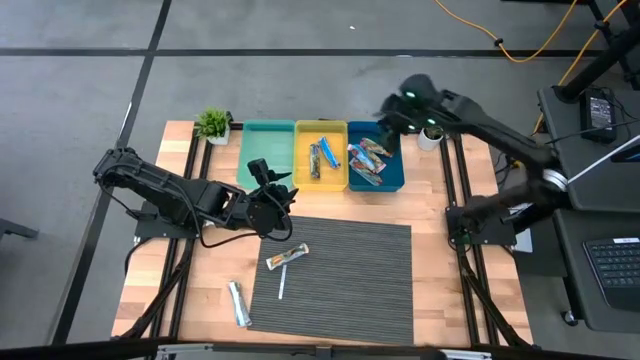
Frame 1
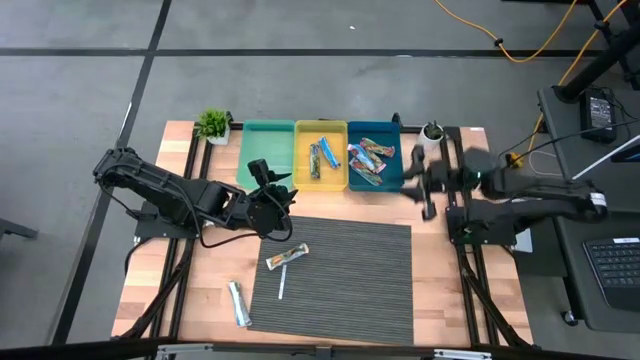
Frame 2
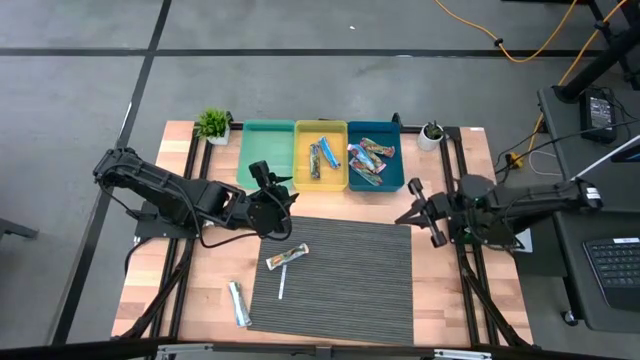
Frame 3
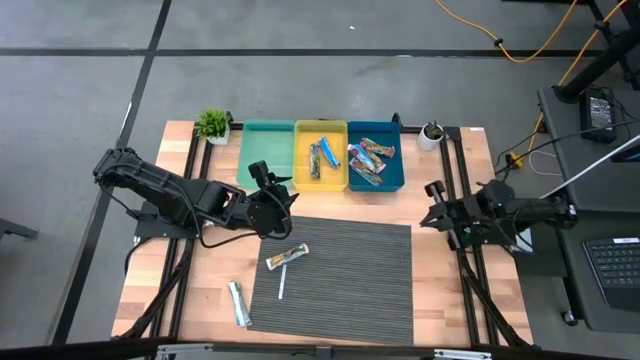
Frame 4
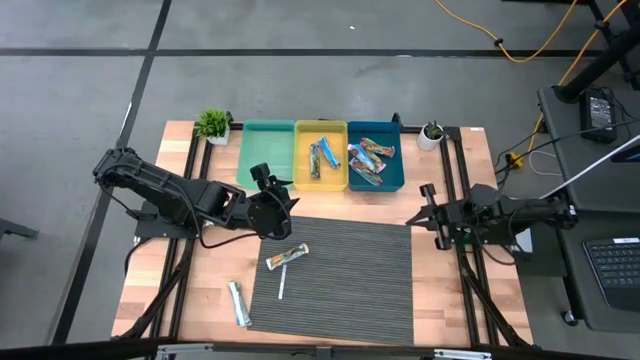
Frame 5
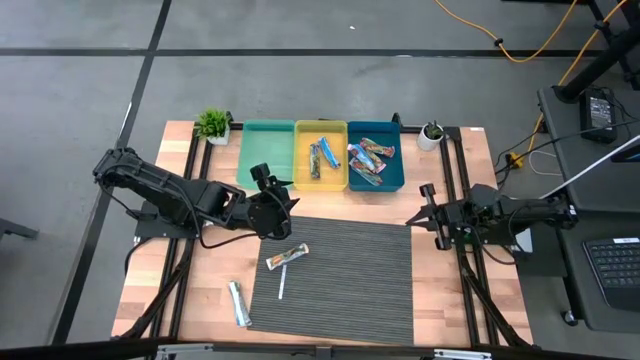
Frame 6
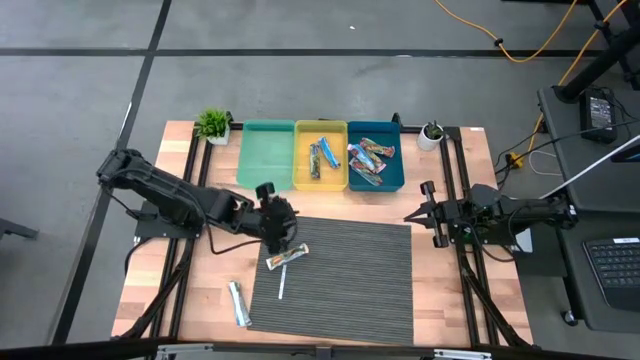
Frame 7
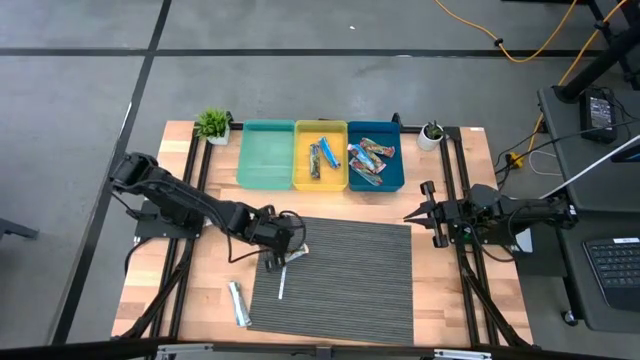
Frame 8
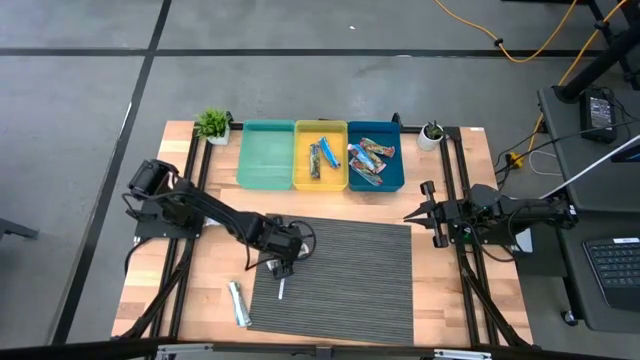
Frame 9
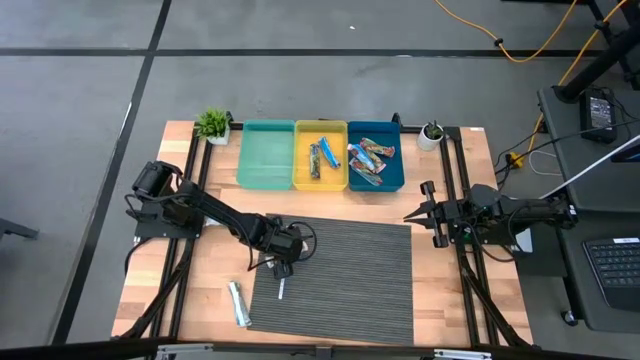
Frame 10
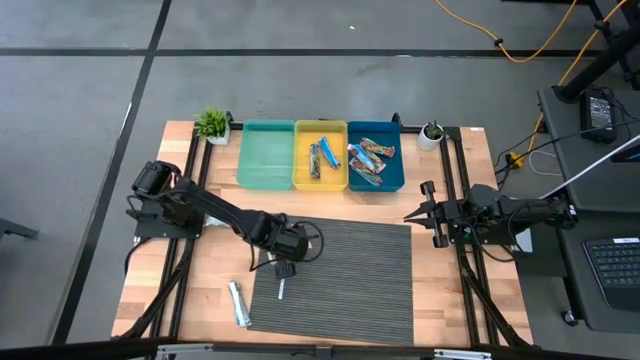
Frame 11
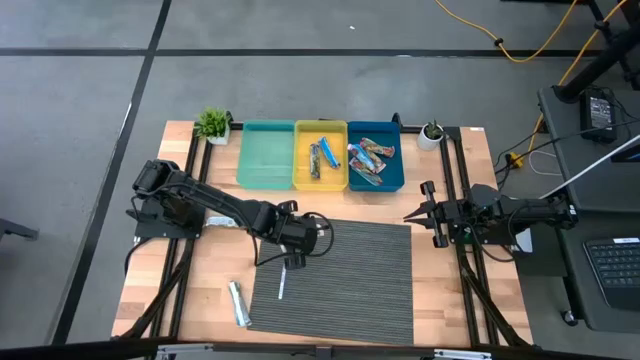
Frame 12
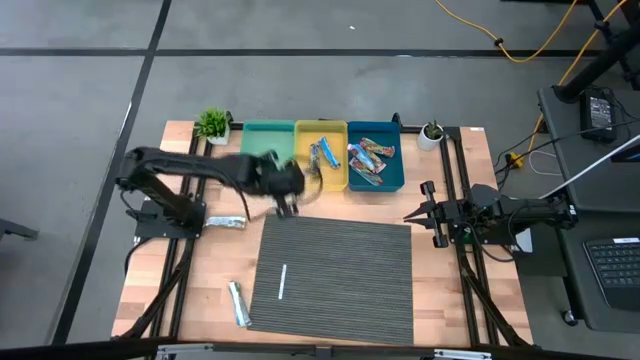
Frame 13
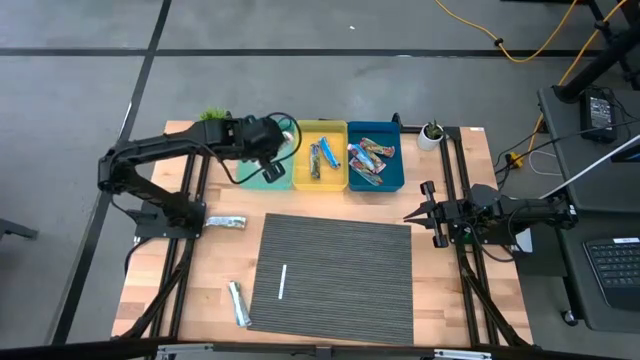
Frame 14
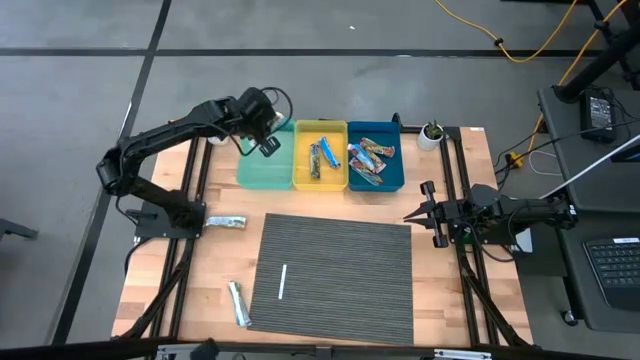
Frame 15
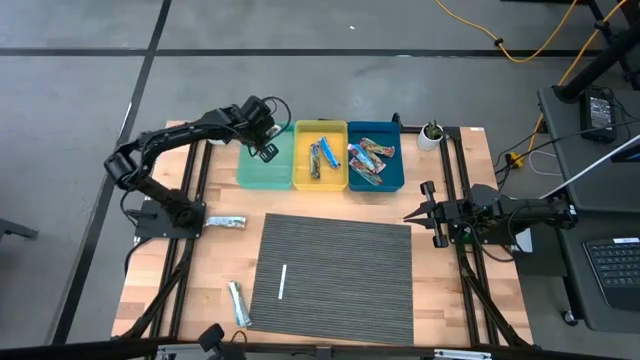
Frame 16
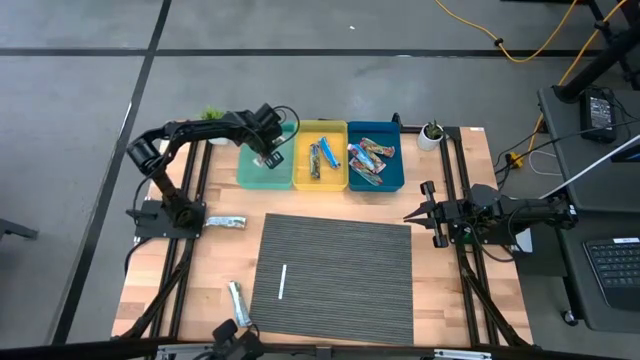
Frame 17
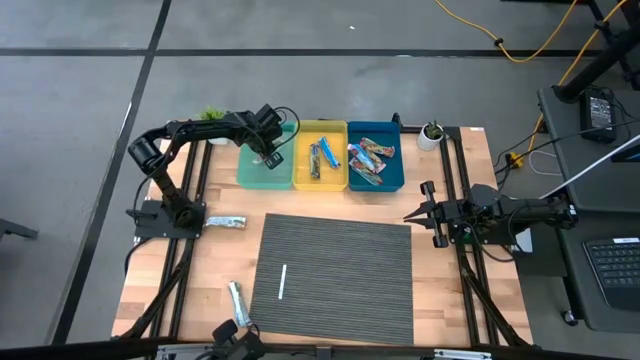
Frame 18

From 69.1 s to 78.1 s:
Task: Pick and place Granola Bars by type
Put the yellow granola bar into the green bin

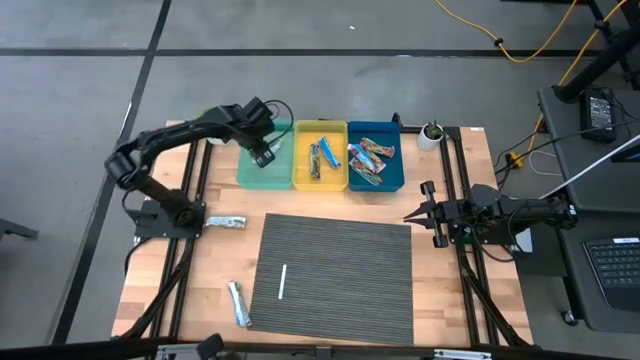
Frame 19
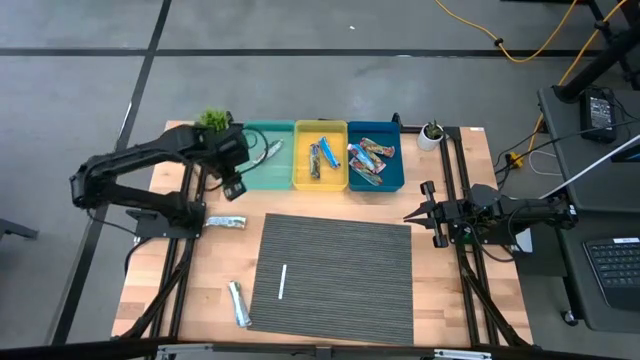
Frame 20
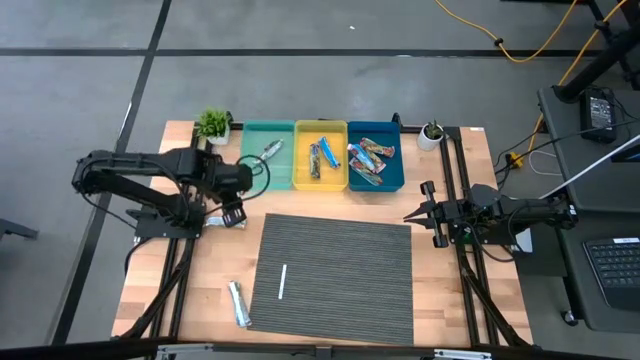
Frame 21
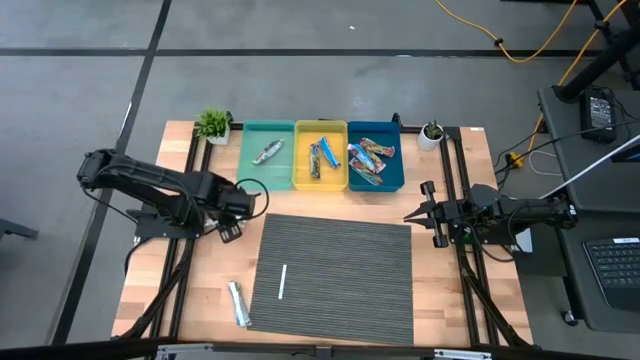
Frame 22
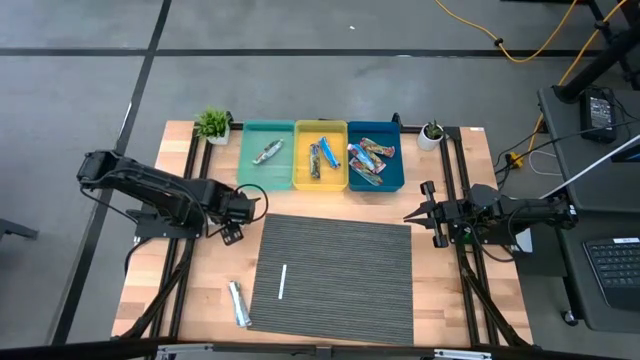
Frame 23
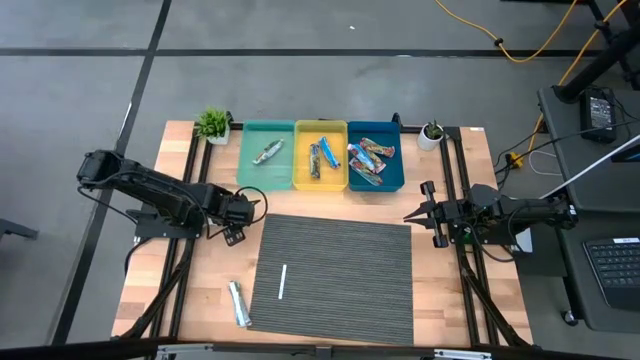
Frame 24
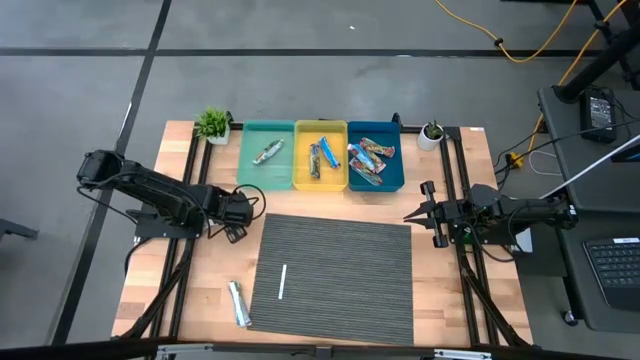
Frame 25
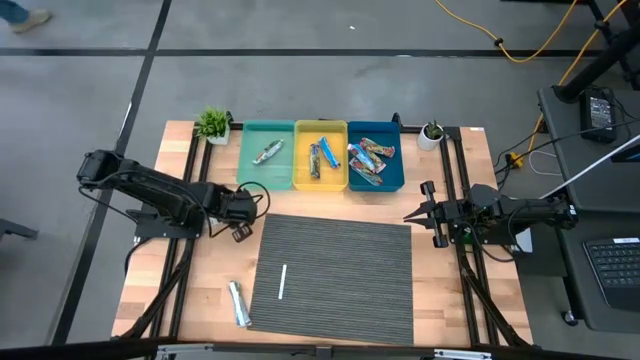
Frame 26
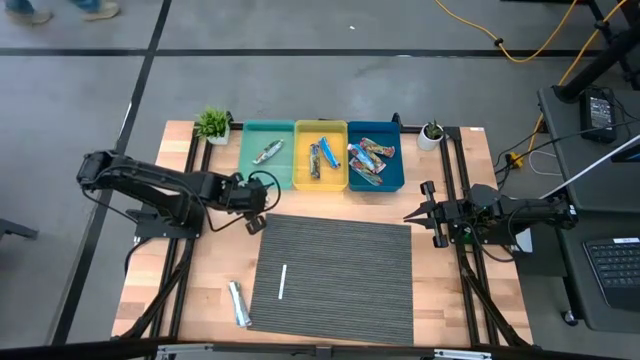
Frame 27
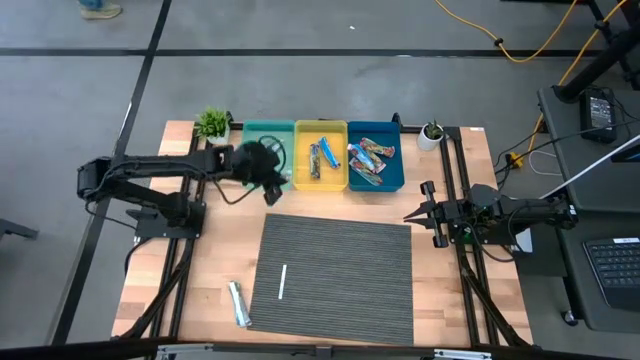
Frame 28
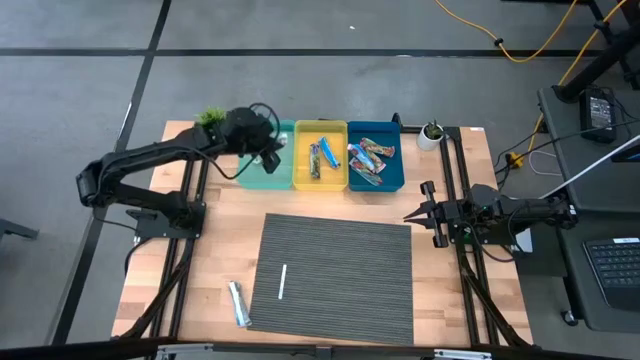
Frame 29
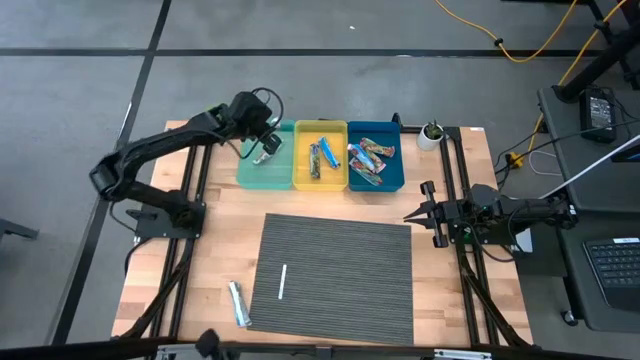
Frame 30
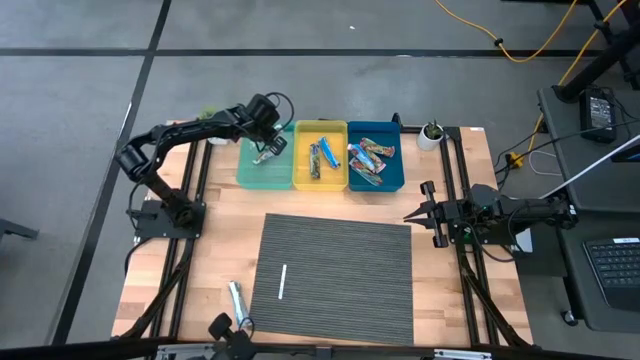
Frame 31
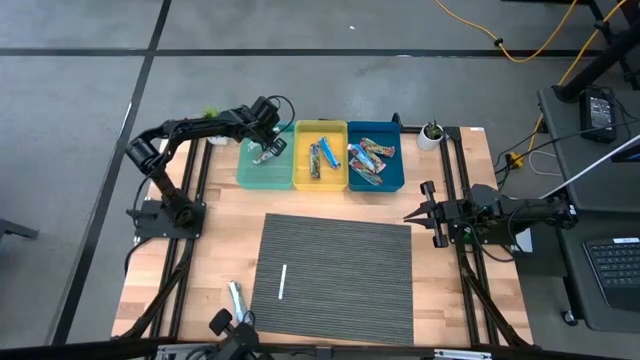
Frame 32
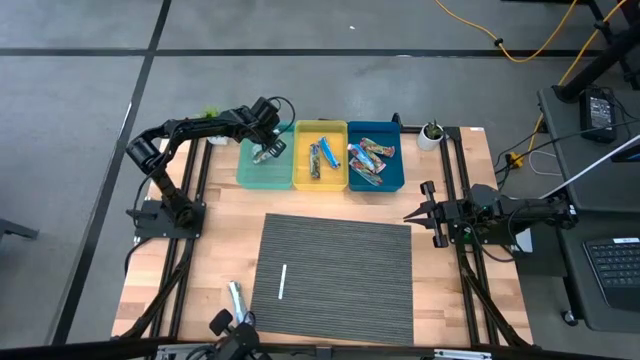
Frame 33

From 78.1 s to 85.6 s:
Put the yellow granola bar into the green bin

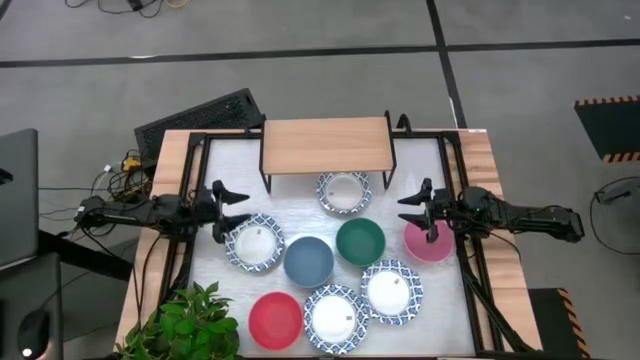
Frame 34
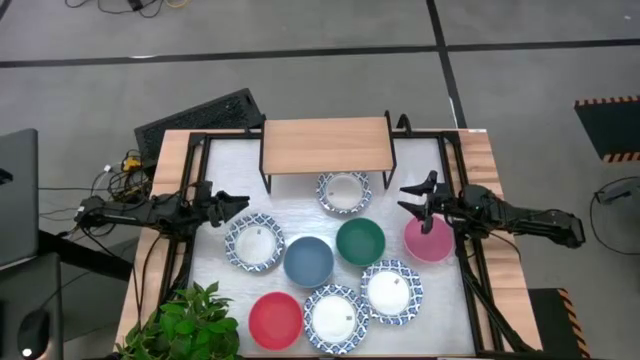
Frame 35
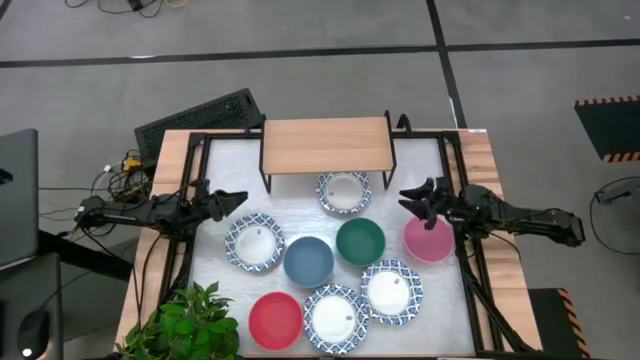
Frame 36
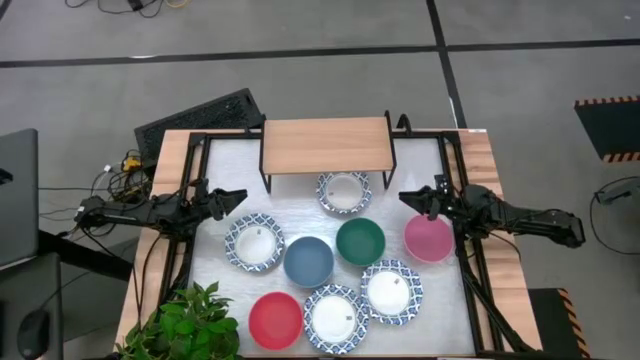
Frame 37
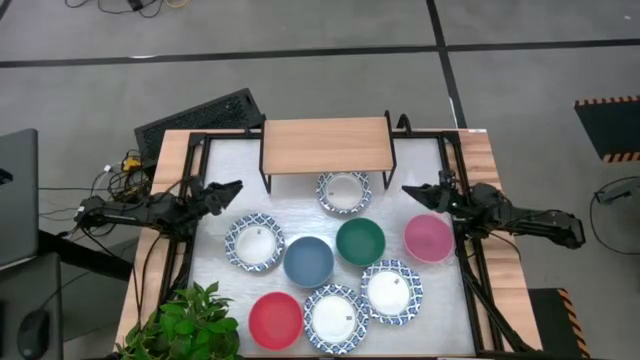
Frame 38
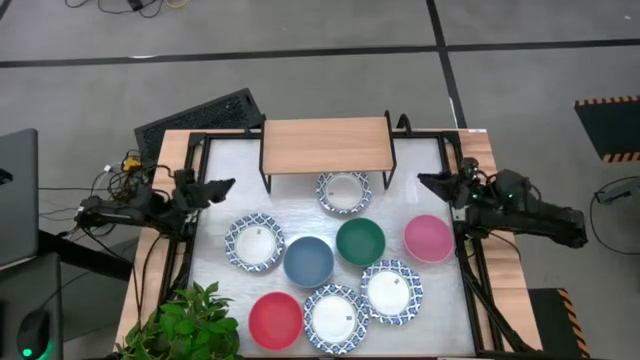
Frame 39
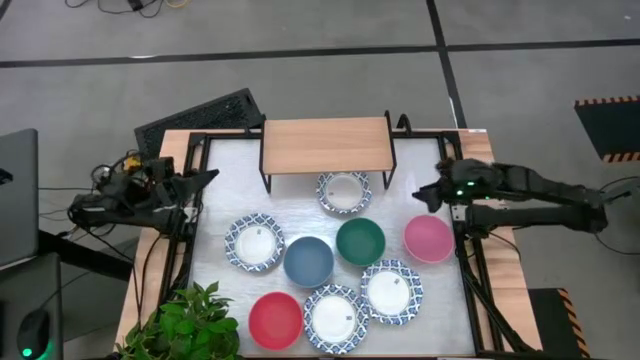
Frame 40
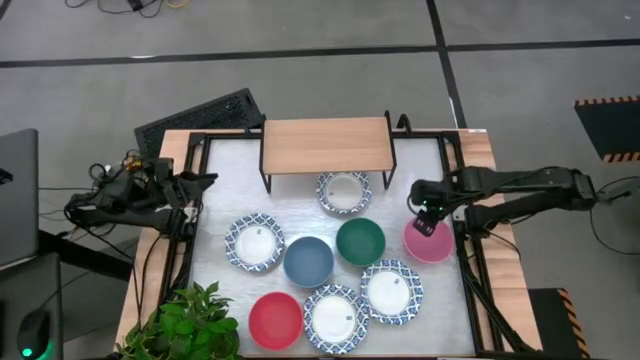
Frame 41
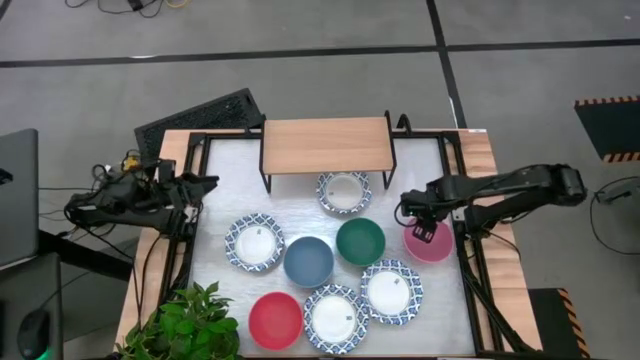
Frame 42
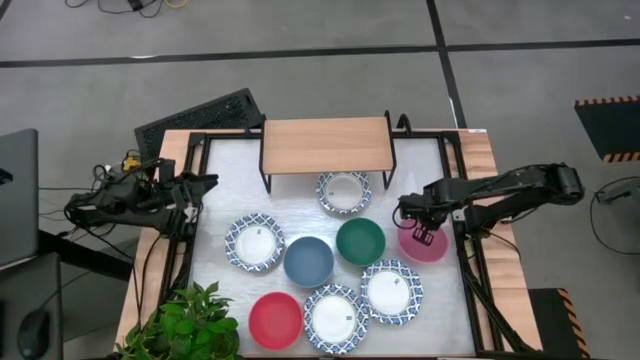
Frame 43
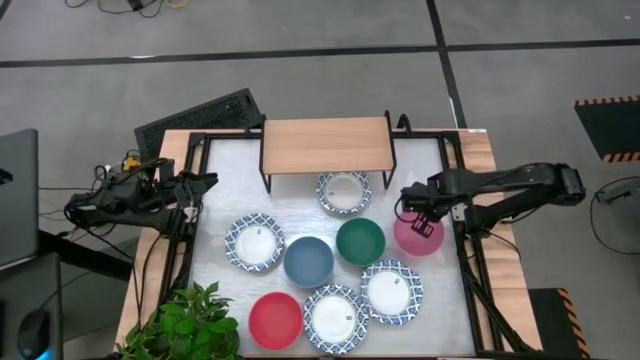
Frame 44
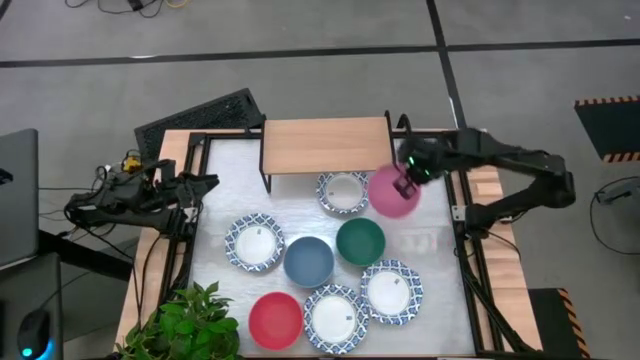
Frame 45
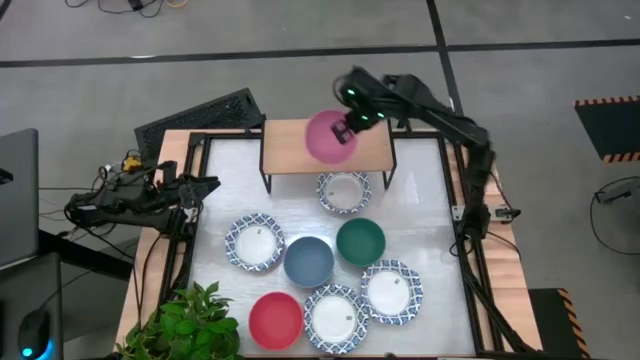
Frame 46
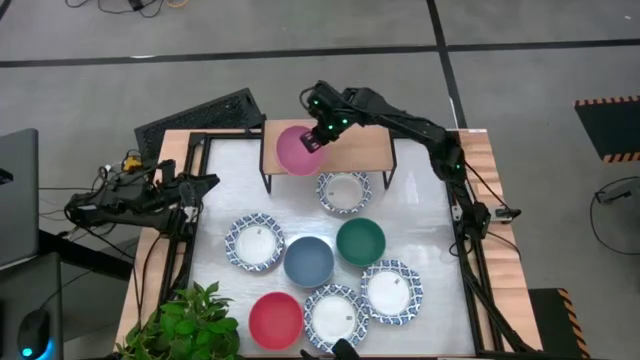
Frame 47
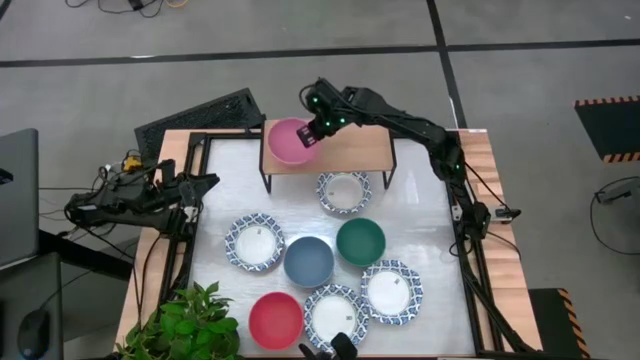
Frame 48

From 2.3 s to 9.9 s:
Task: Place and stack bowls onto a shelf
Put the pink bowl on the shelf
